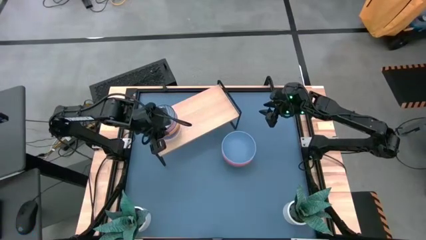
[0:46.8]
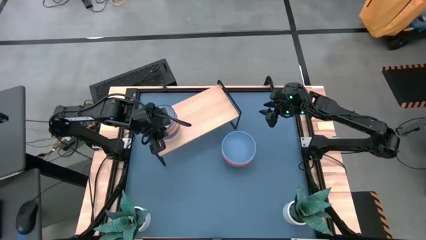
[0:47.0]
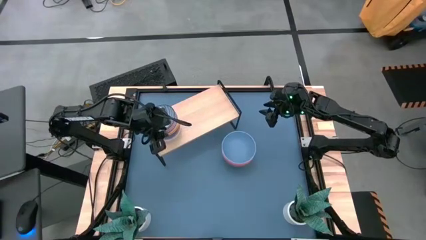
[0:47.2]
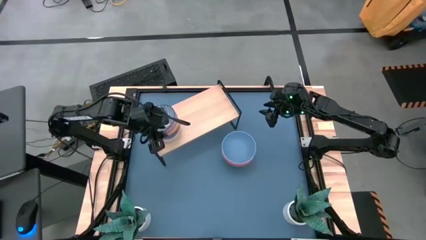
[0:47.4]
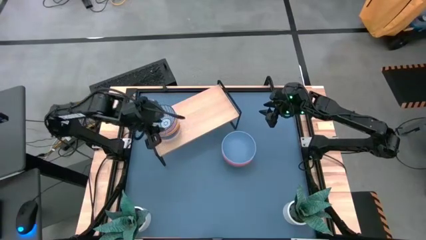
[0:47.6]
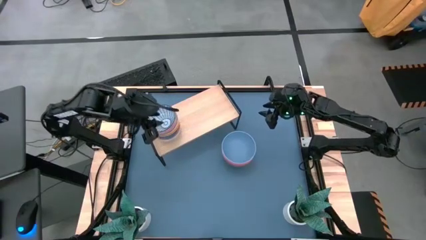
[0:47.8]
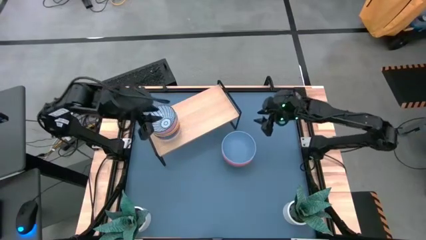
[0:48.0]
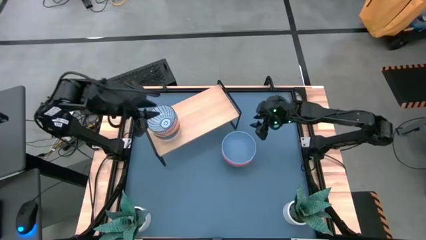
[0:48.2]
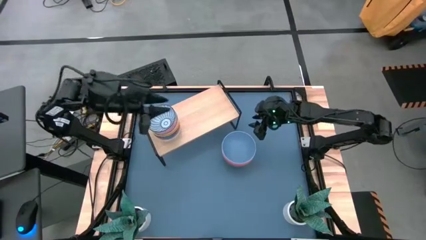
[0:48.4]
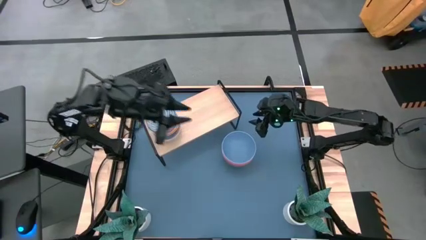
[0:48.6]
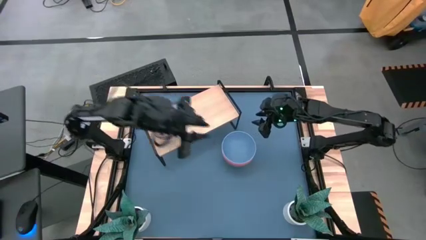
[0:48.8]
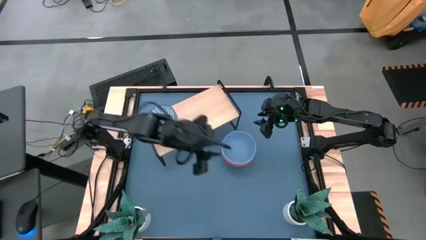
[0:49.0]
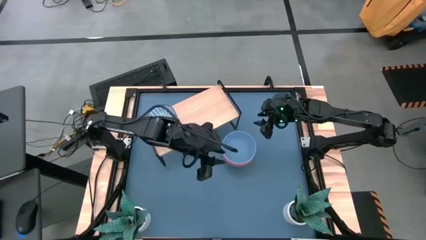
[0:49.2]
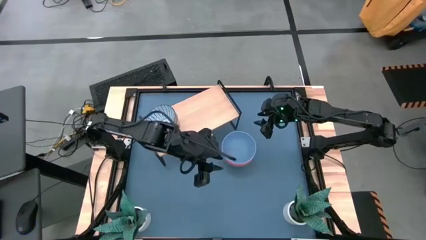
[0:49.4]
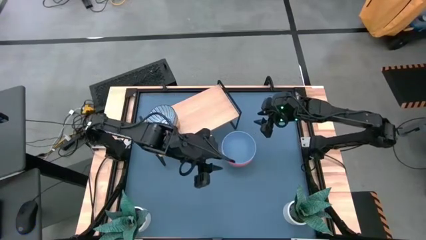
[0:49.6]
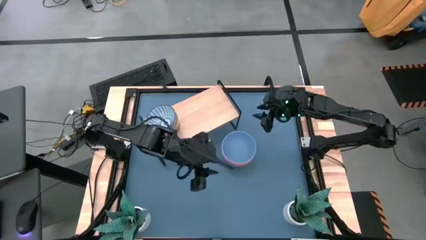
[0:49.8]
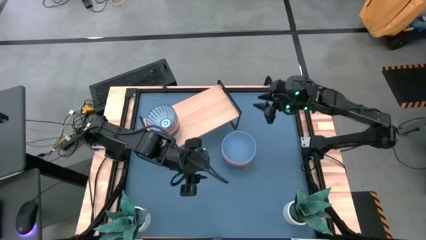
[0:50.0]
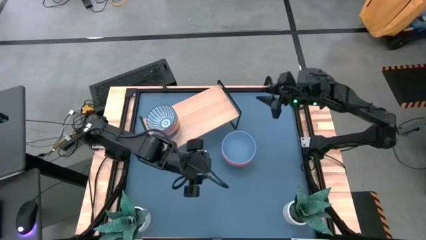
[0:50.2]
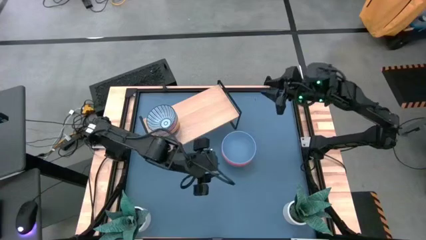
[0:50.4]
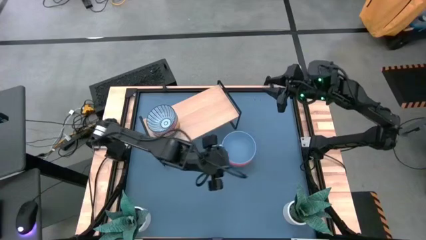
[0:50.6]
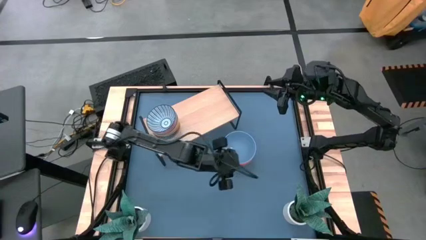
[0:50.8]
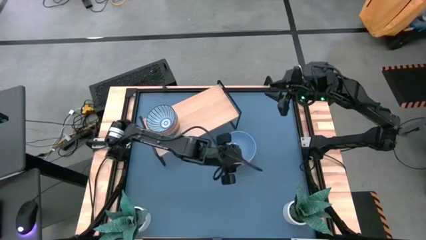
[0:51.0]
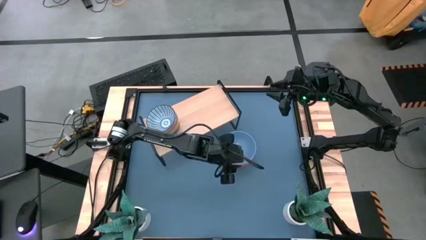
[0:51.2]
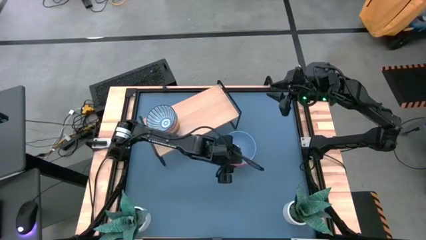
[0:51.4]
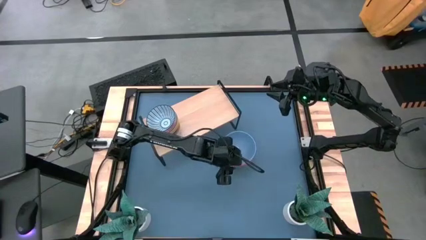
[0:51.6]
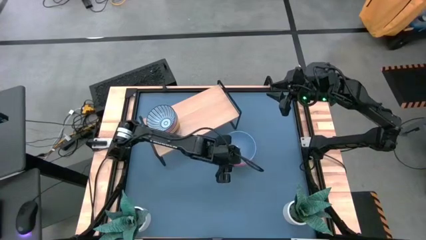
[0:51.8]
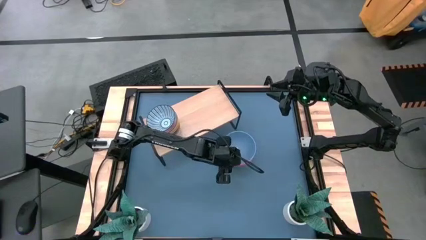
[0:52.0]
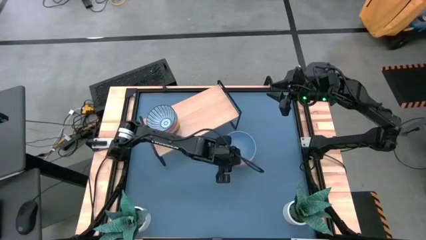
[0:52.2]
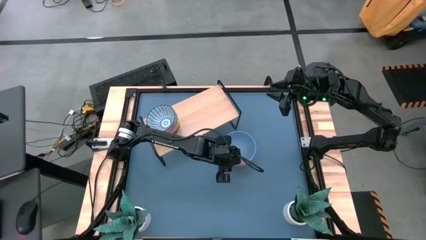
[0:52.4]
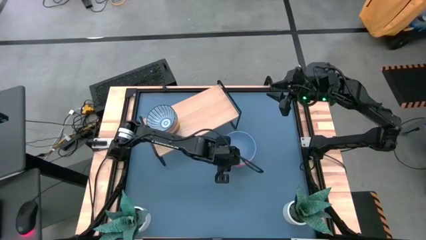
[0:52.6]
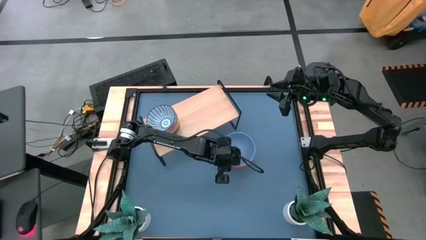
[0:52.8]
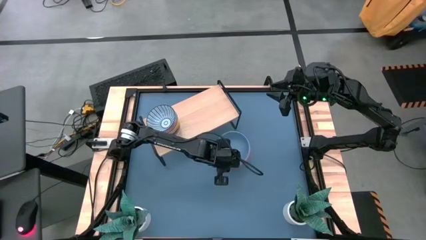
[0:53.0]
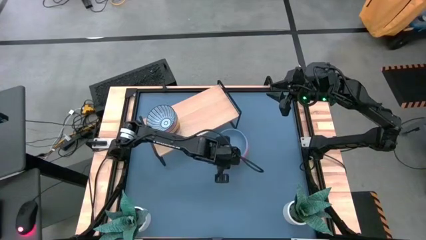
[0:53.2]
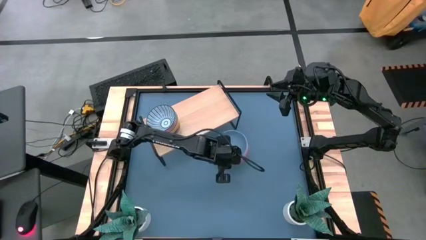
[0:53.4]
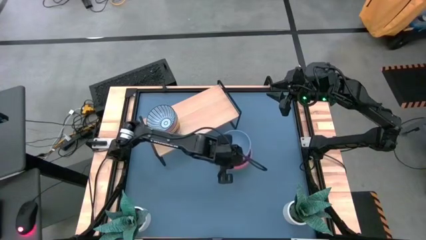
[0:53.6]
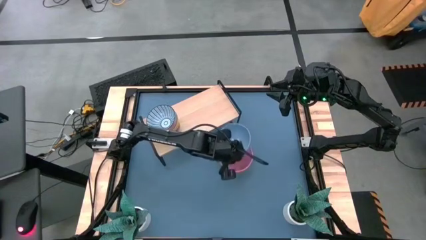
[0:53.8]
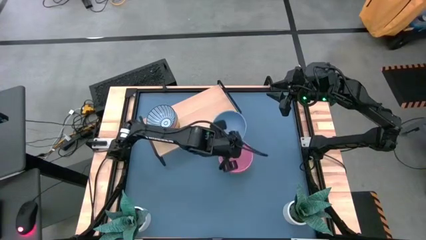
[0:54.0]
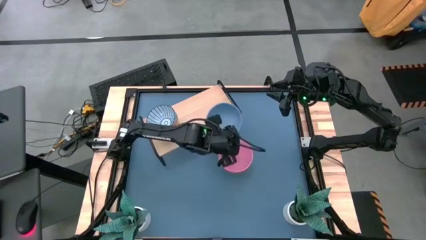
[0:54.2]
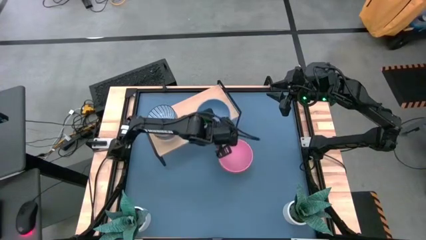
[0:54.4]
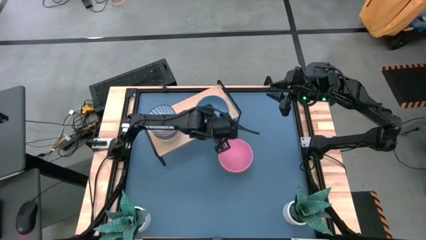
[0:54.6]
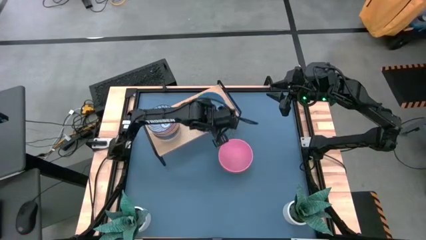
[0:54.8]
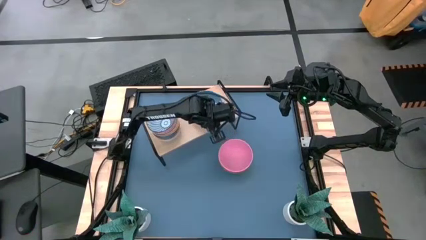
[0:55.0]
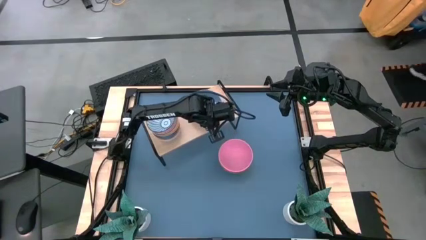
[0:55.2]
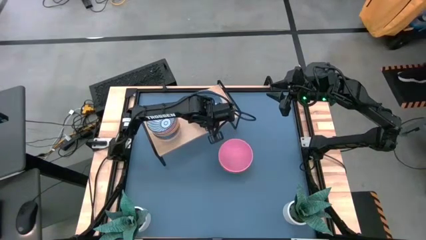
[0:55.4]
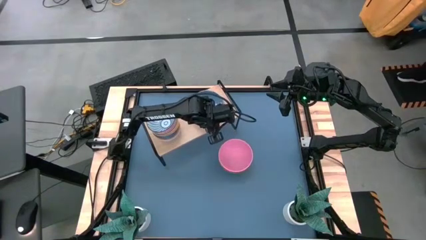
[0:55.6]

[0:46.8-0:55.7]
Task: Place and stack bowls onto a shelf
Put the big blue bowl on the shelf

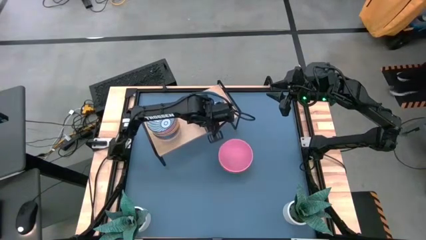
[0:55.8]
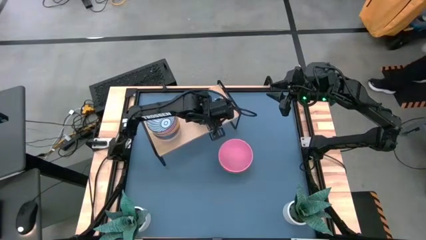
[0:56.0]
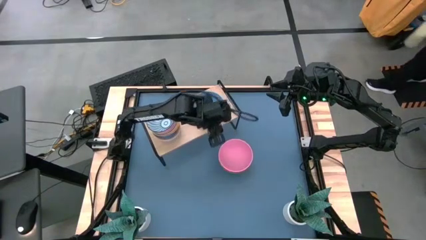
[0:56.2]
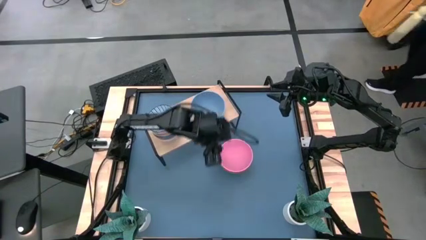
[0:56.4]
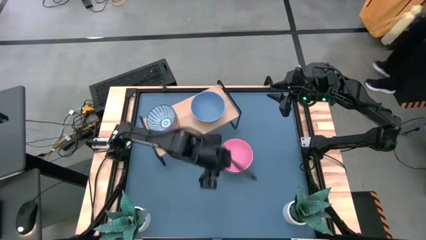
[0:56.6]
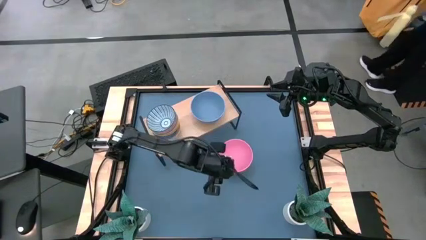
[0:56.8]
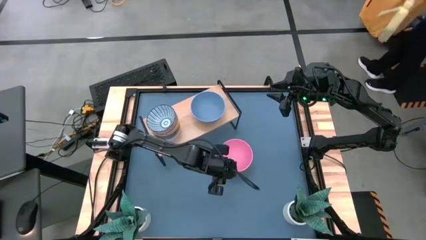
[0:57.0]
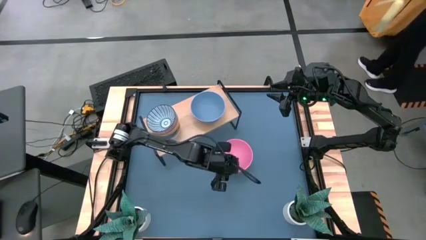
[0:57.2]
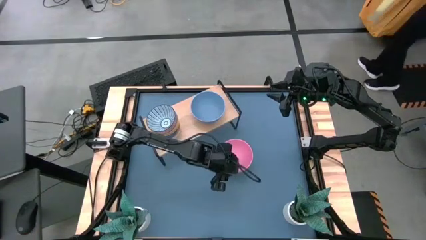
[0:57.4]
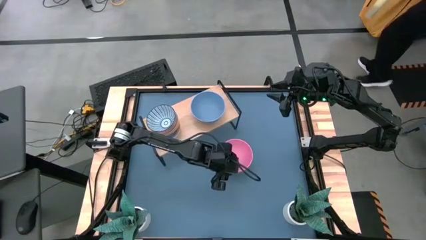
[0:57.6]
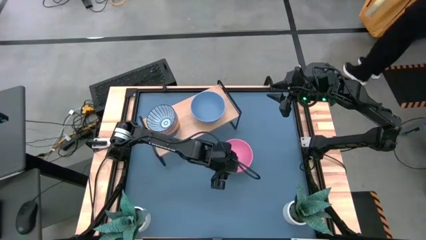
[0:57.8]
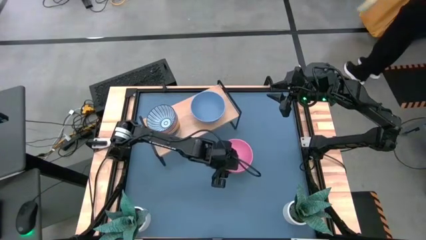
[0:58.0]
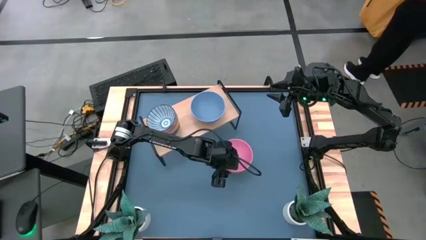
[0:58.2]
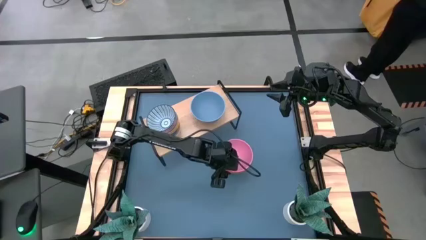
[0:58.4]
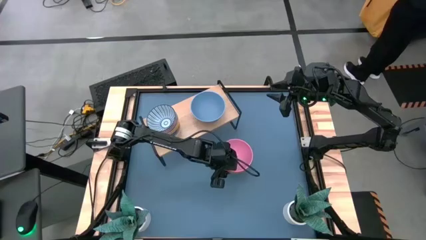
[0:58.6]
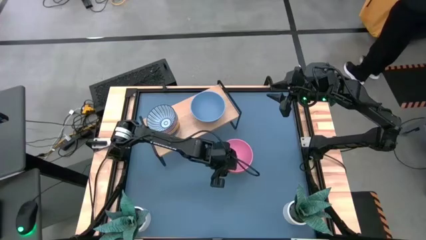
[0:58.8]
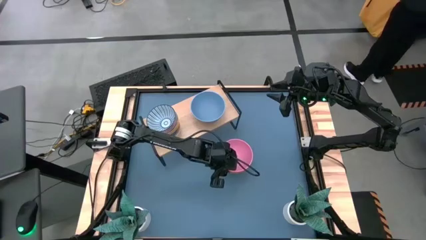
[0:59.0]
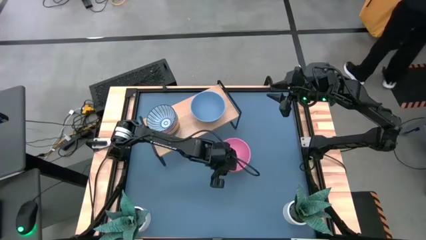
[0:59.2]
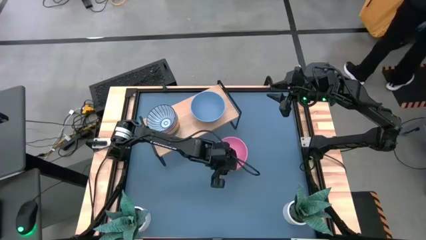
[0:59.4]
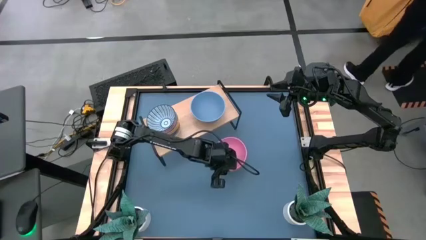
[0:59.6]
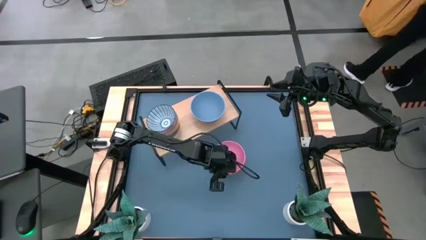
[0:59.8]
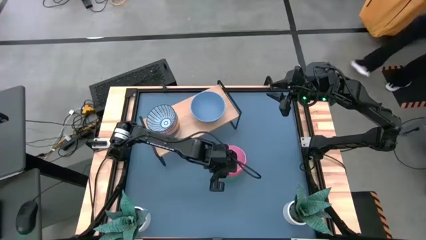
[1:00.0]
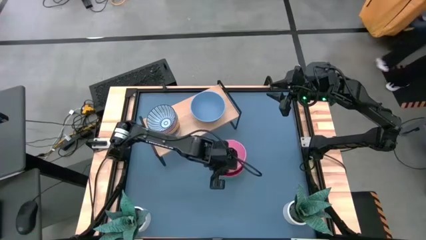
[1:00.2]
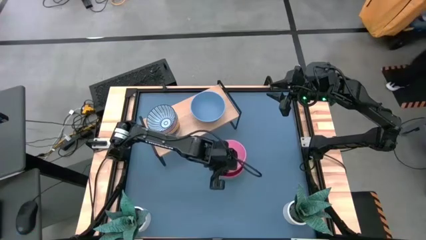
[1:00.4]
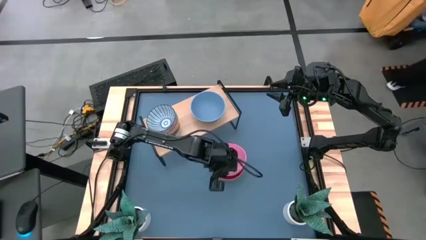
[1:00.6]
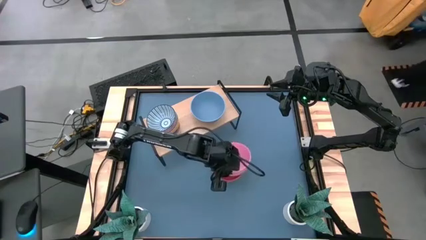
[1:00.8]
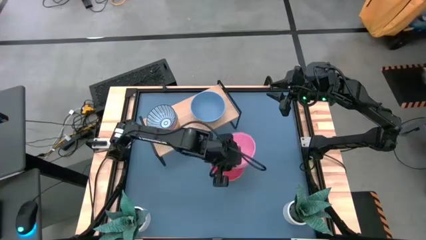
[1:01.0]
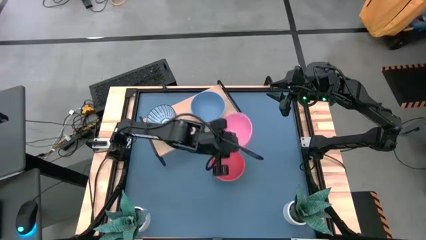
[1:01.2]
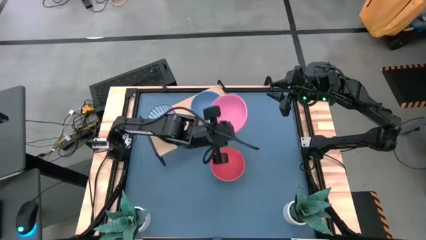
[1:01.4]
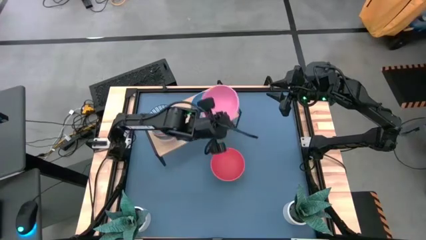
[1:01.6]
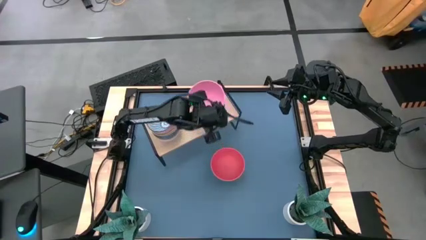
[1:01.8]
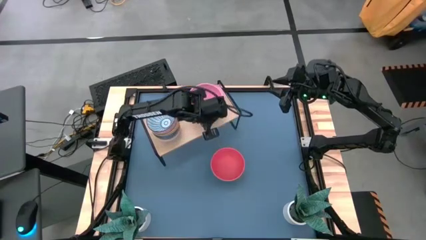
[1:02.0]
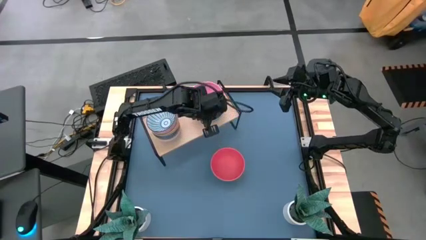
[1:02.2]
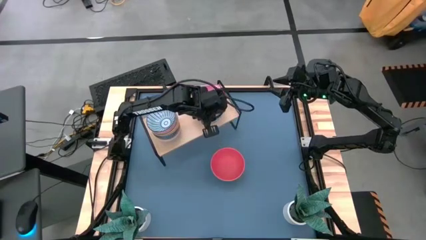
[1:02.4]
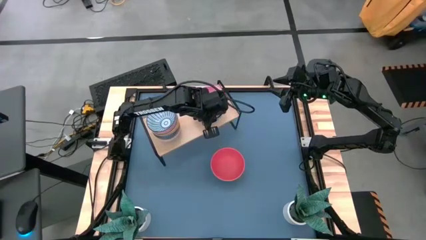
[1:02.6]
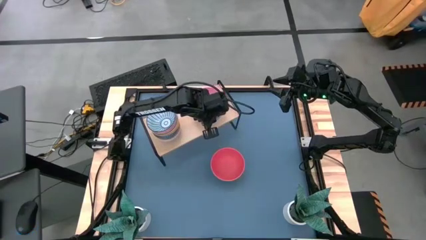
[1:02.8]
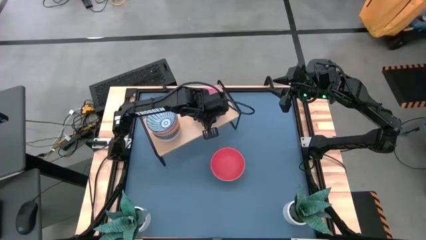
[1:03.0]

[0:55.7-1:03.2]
Stack the big pink bowl on top of the big blue bowl on the shelf
